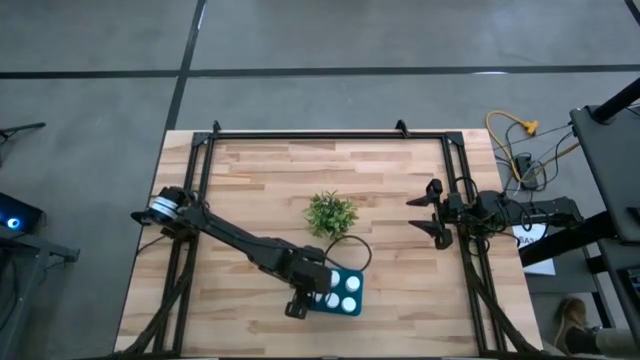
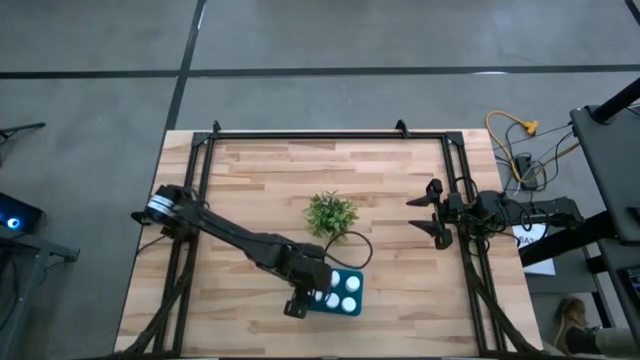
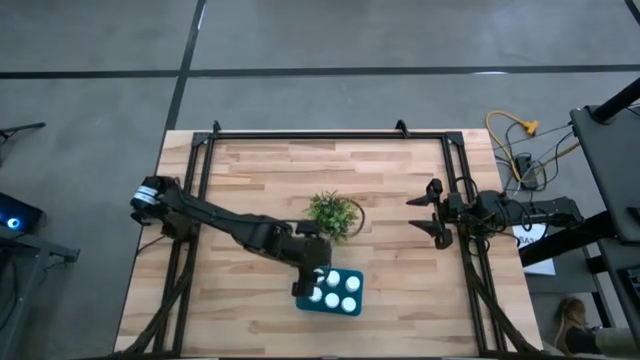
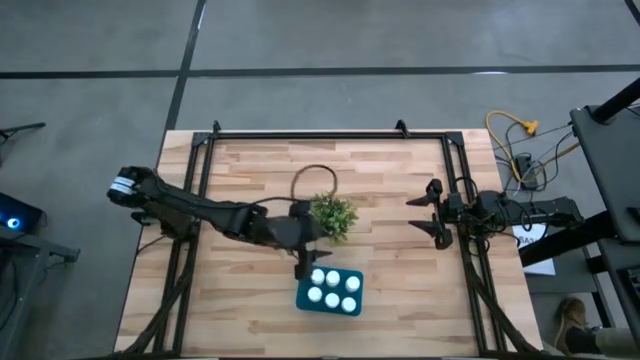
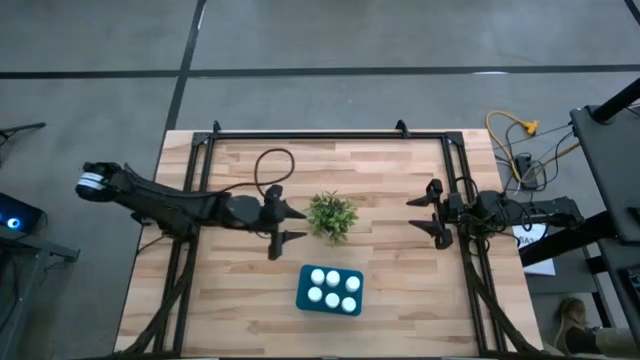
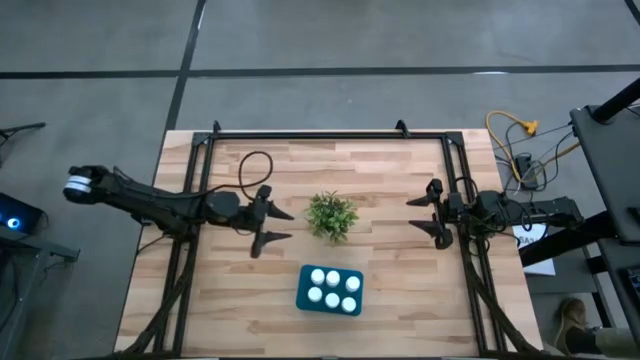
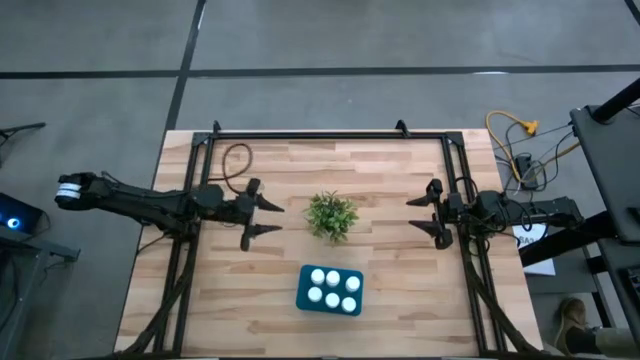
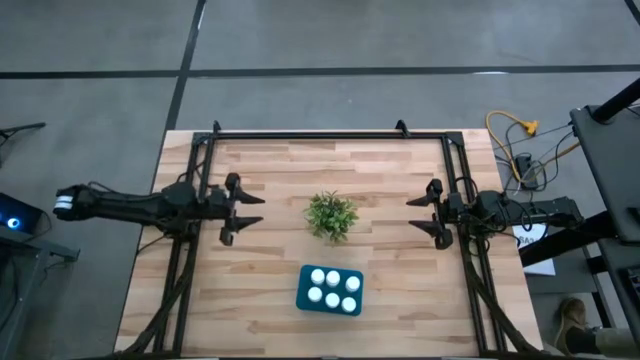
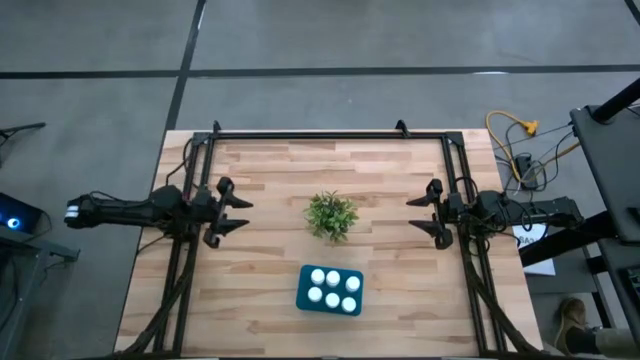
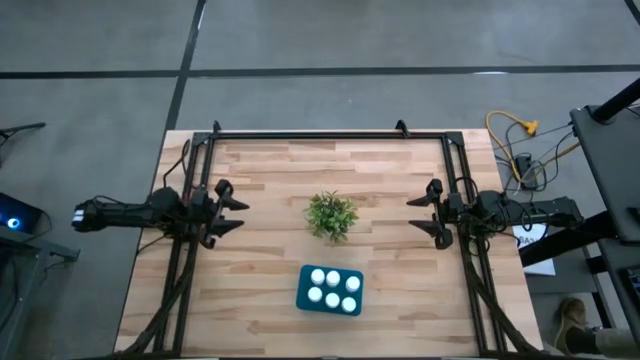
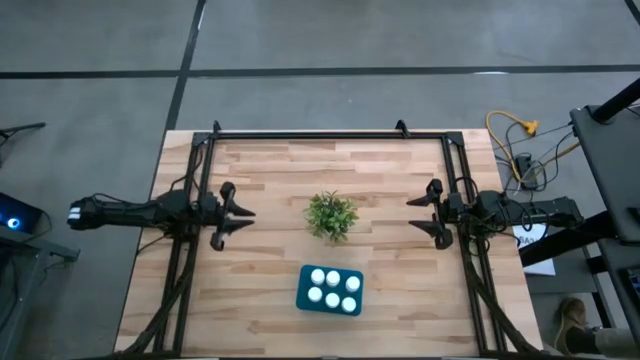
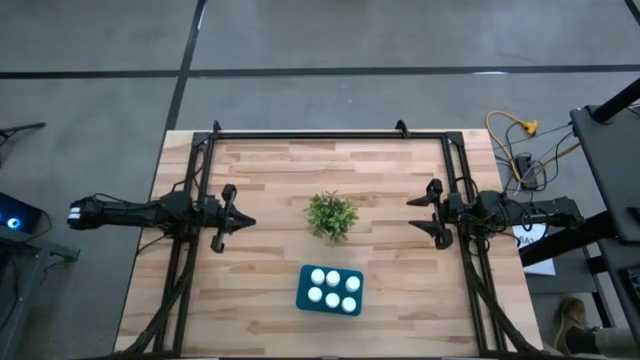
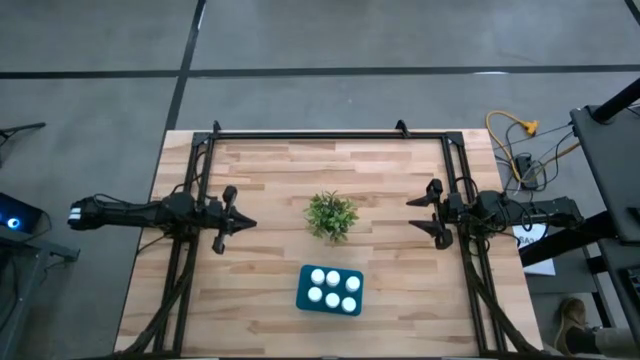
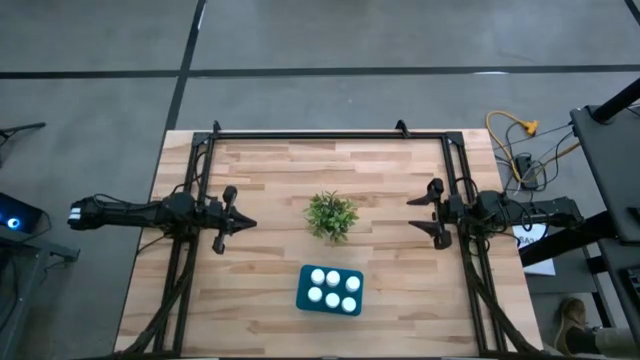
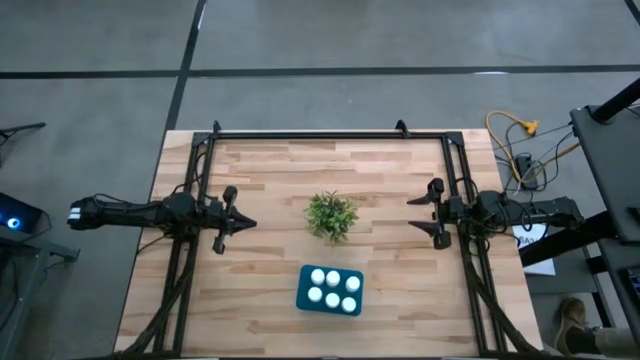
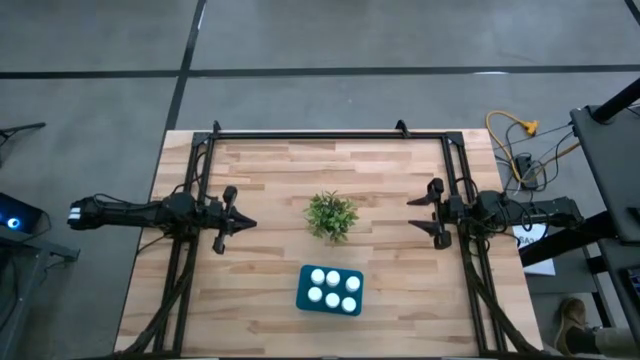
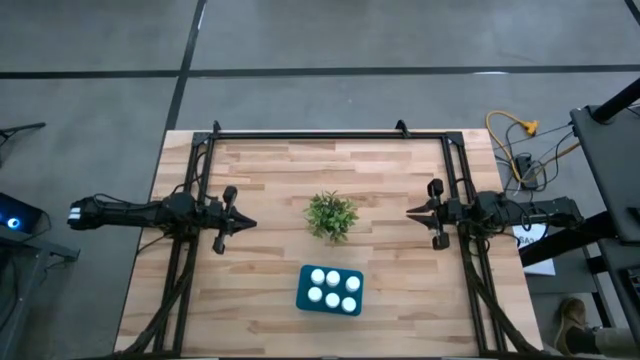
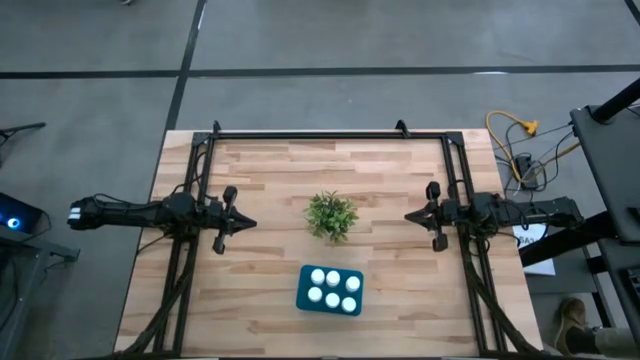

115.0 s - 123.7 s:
Task: Pick and place pill bottles into a basket
Return to Home Position

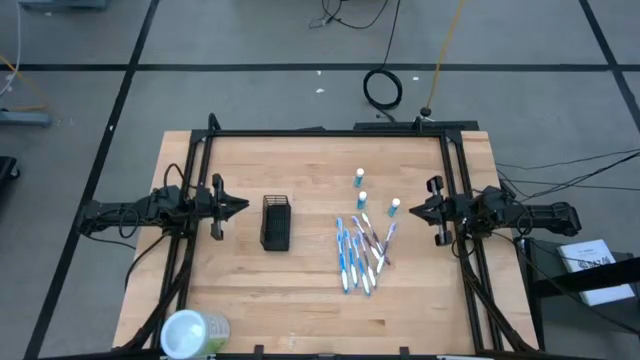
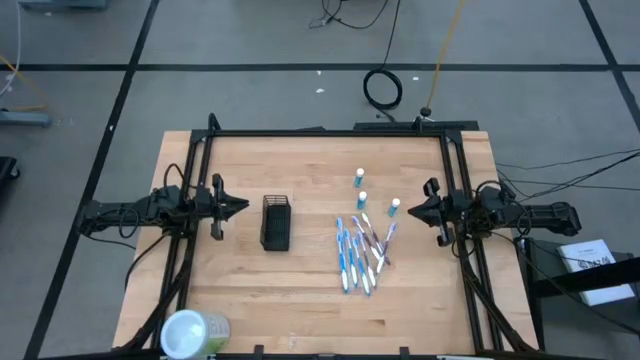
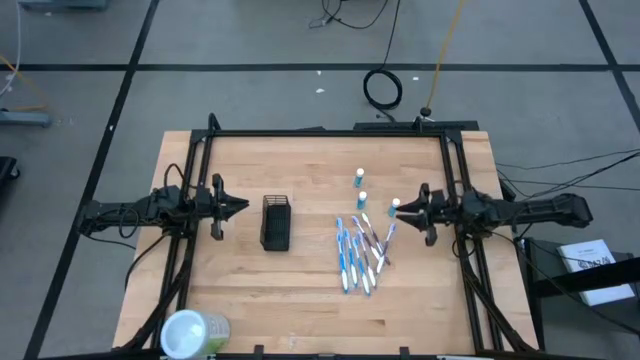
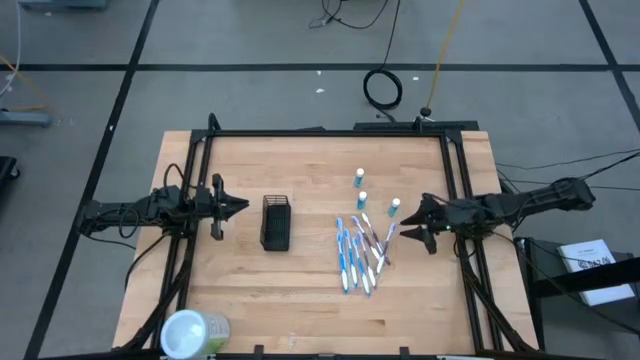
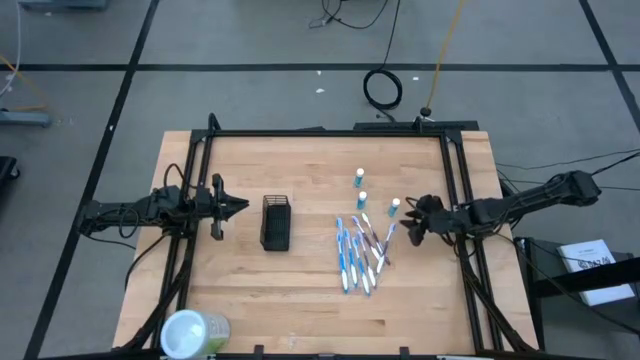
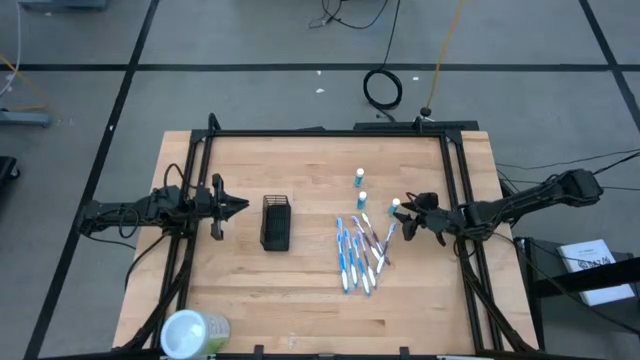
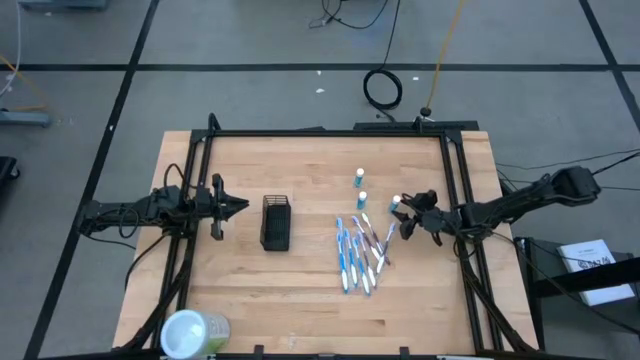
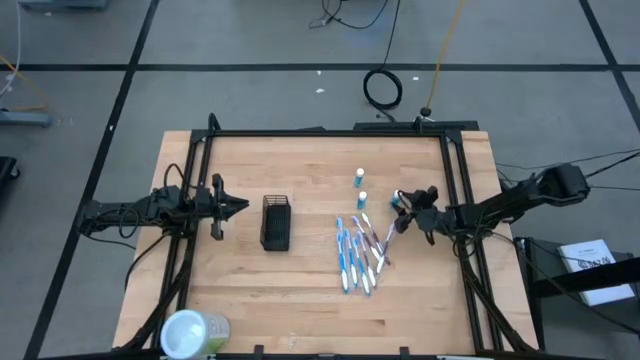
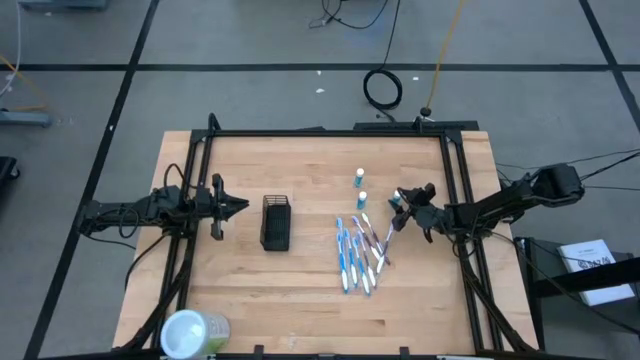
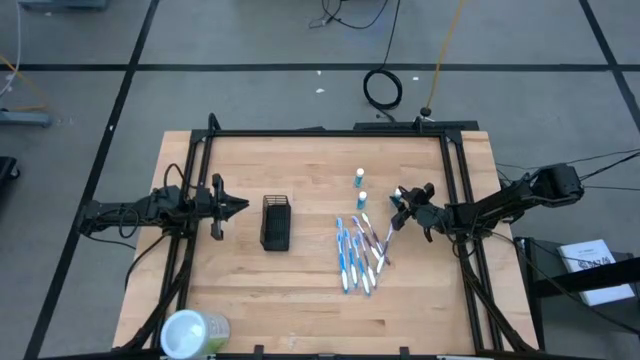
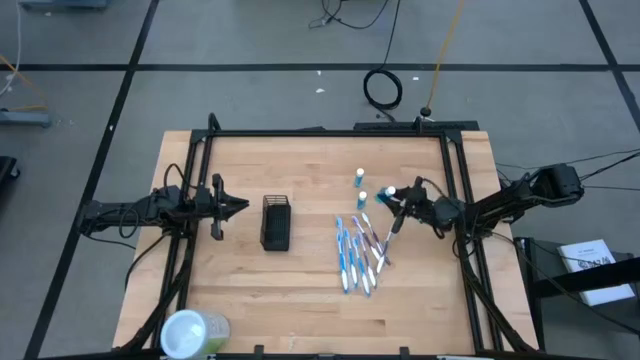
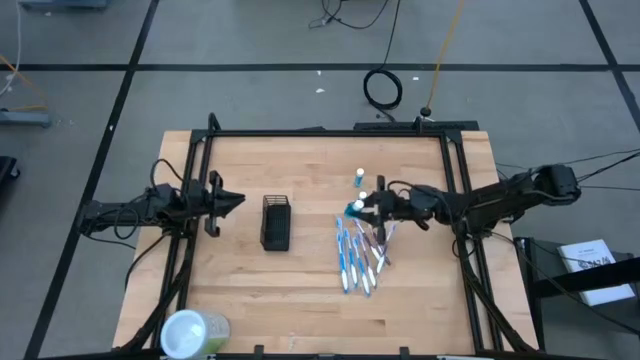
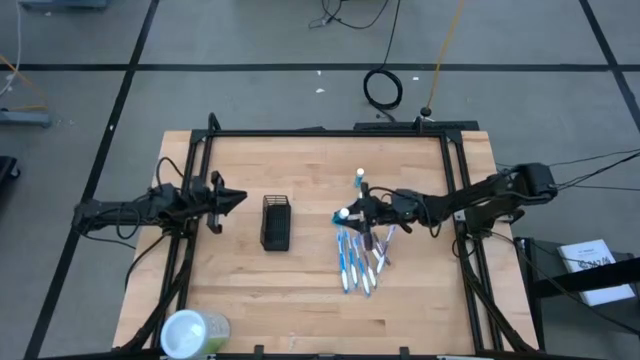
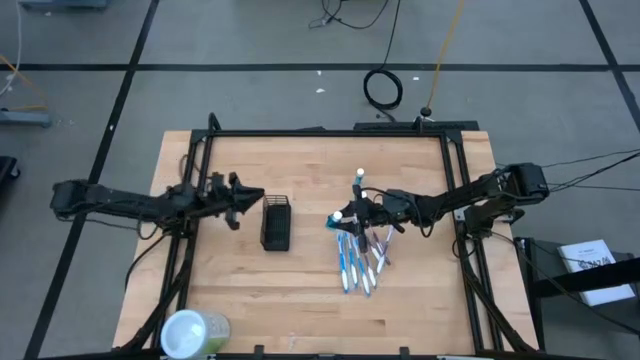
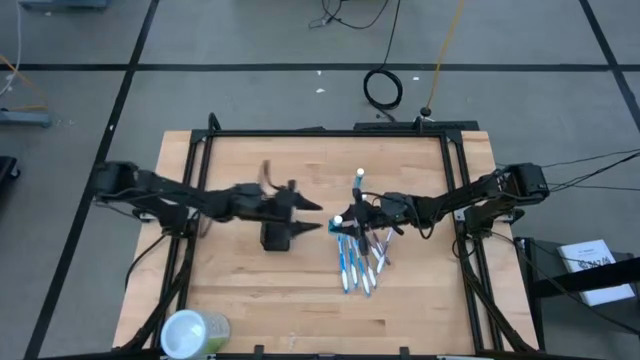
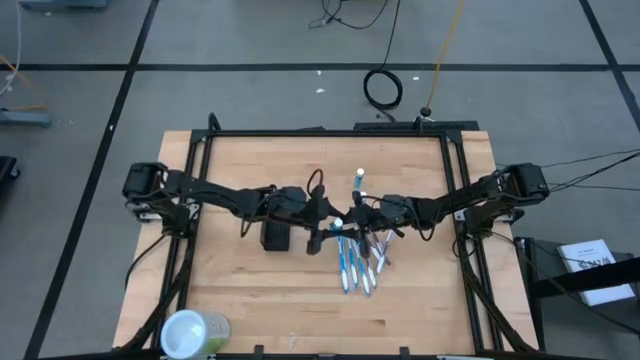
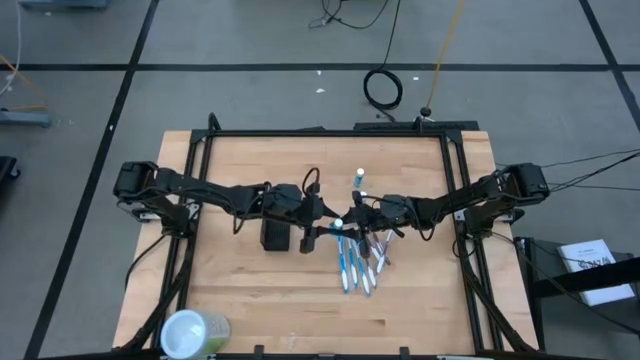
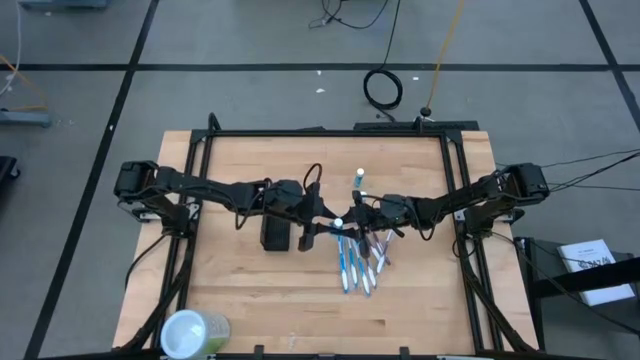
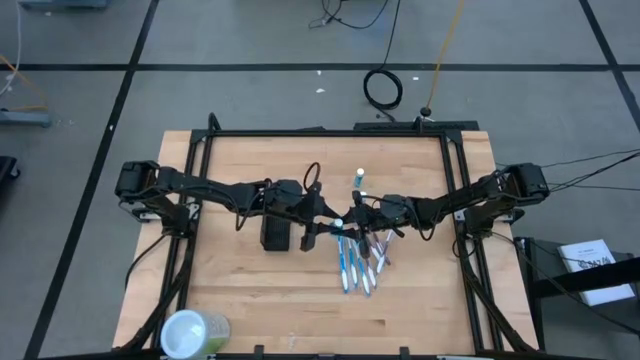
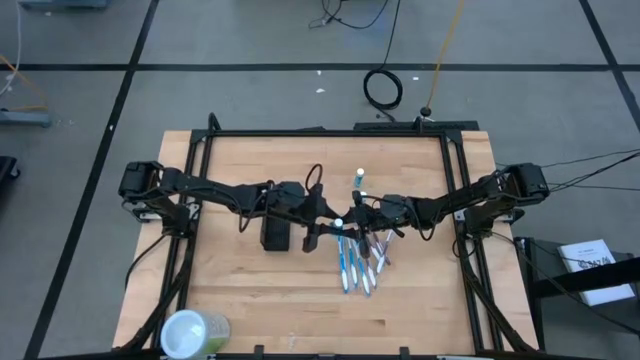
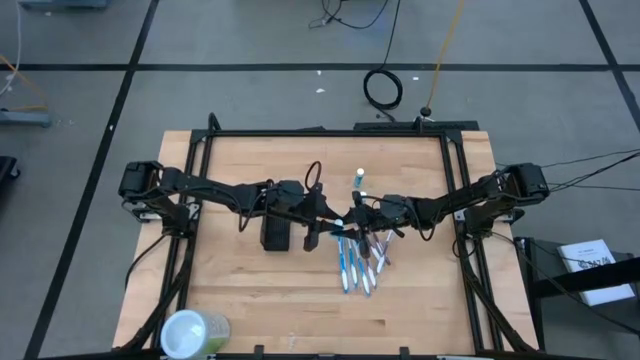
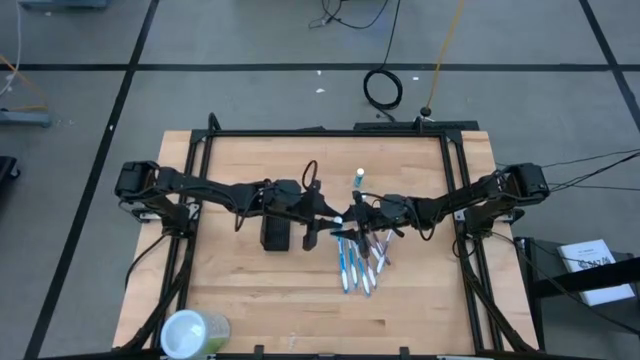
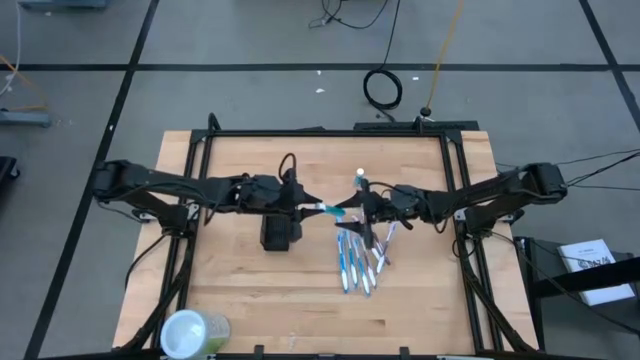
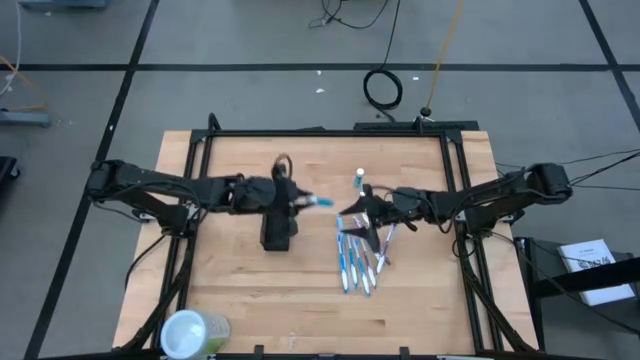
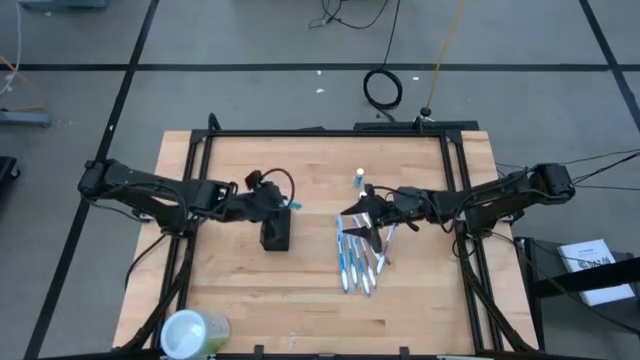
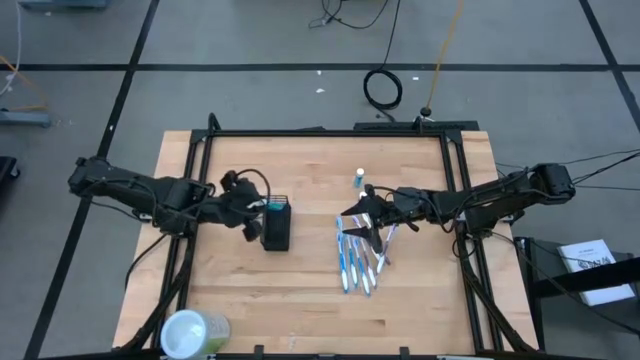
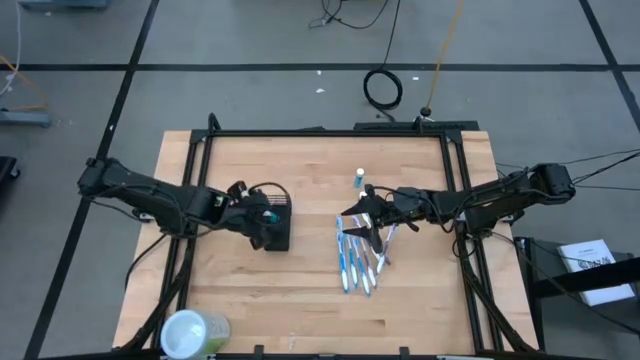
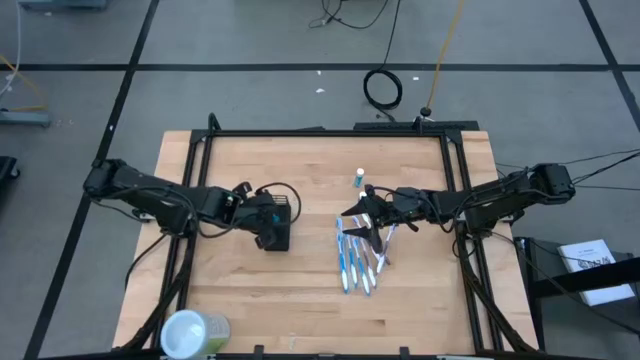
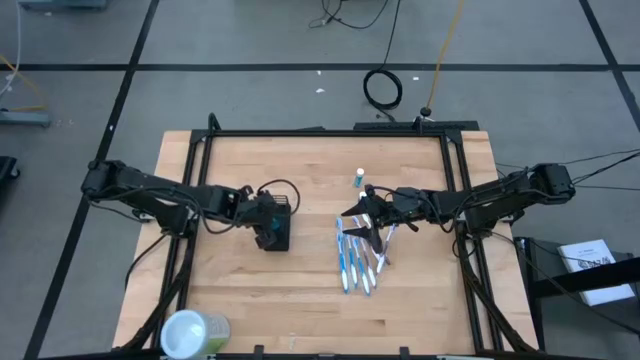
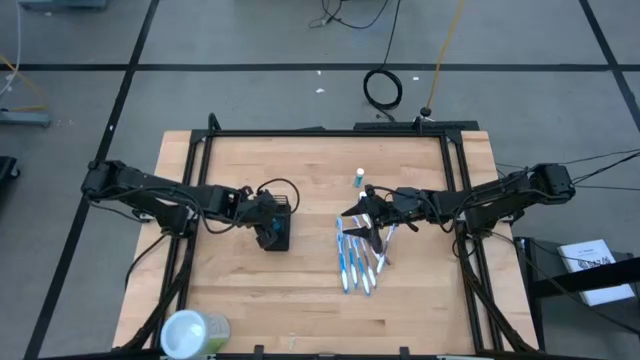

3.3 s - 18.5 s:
Task: Pick & Place toothbrushing station
Put the right mouthwash into the middle compartment of the mesh organizer
